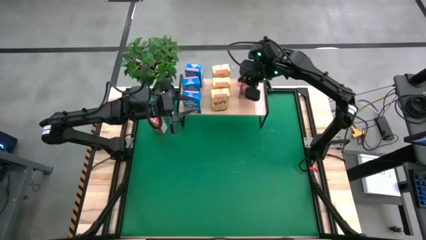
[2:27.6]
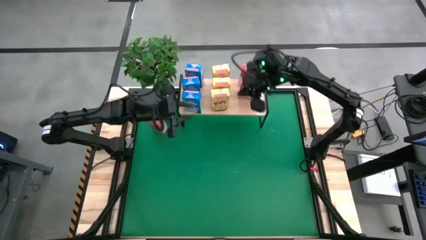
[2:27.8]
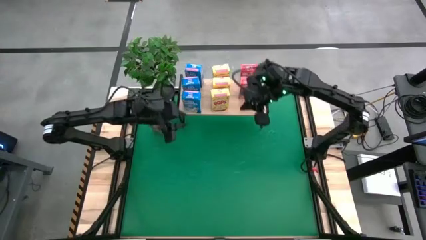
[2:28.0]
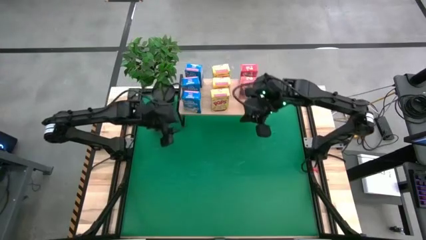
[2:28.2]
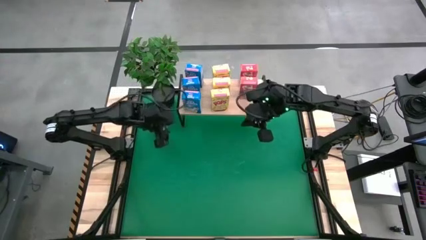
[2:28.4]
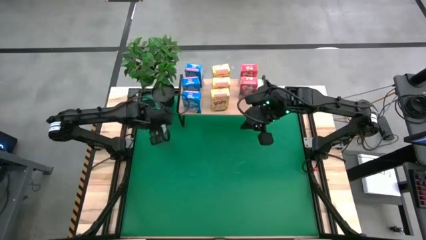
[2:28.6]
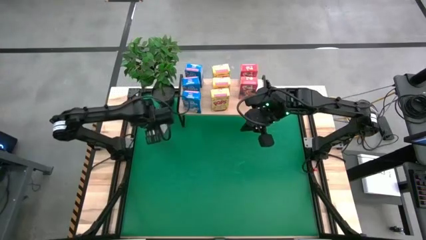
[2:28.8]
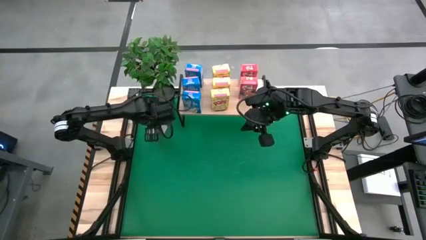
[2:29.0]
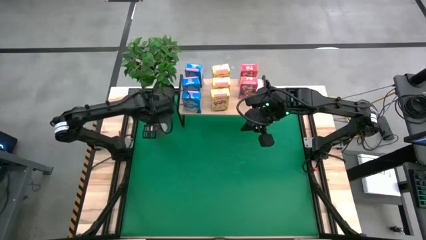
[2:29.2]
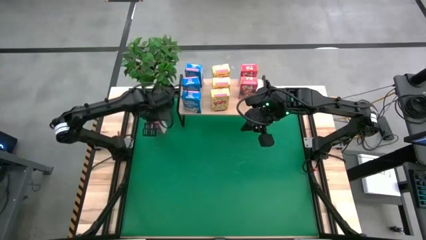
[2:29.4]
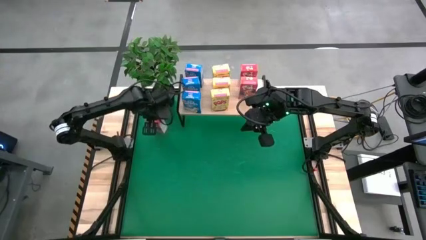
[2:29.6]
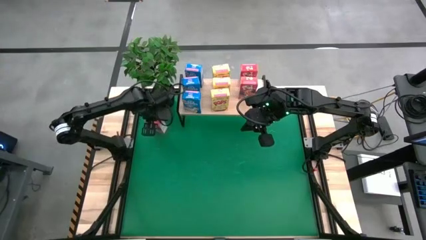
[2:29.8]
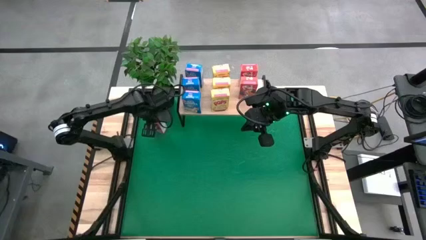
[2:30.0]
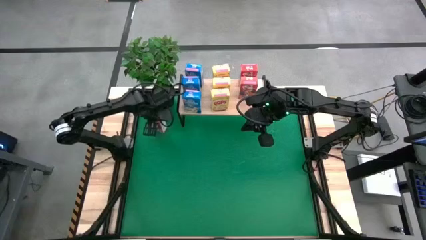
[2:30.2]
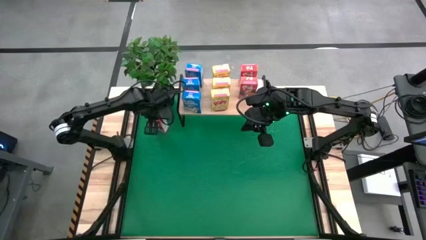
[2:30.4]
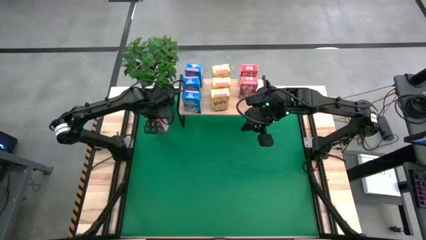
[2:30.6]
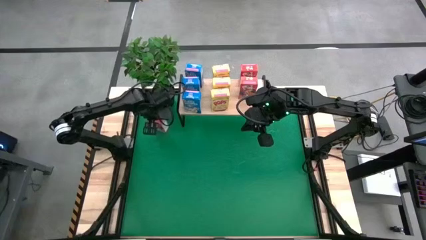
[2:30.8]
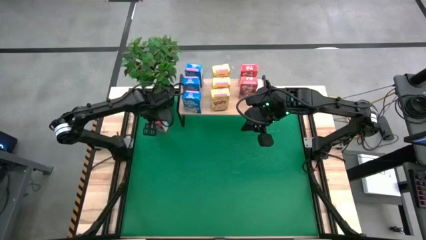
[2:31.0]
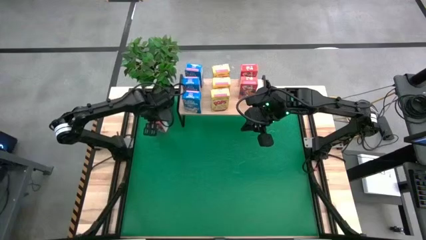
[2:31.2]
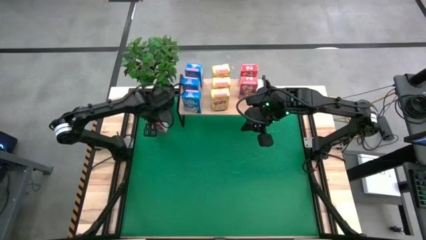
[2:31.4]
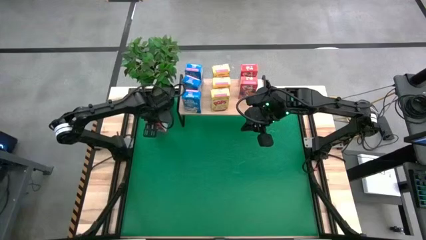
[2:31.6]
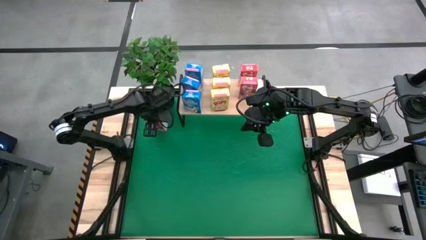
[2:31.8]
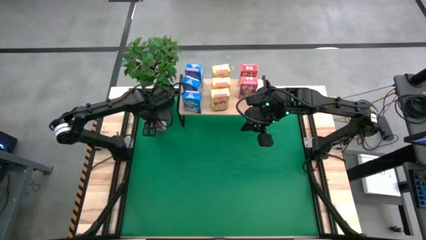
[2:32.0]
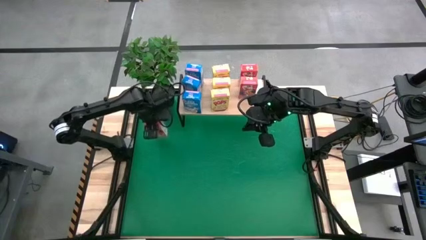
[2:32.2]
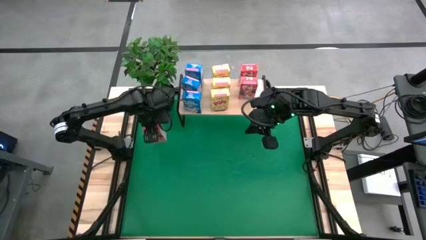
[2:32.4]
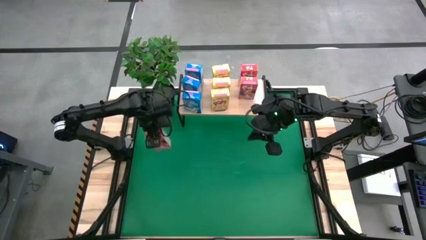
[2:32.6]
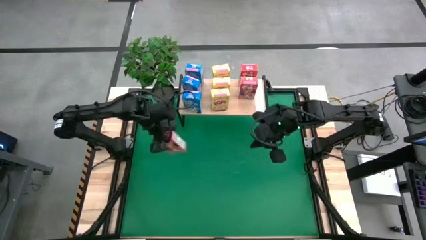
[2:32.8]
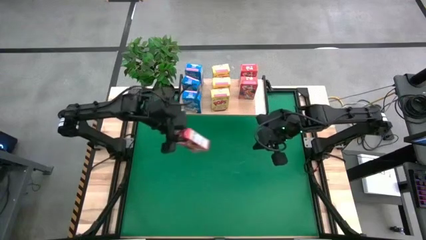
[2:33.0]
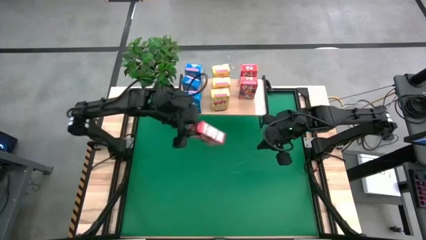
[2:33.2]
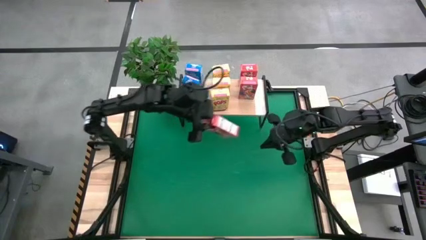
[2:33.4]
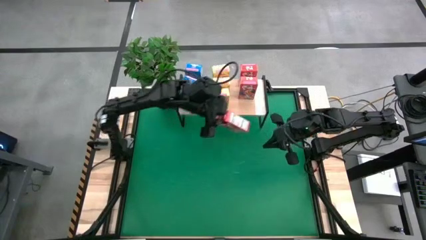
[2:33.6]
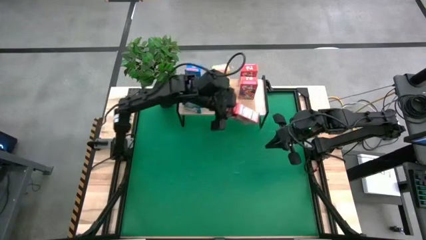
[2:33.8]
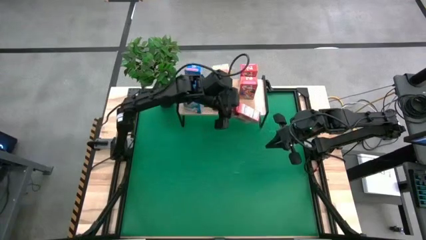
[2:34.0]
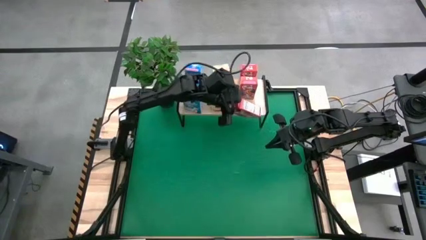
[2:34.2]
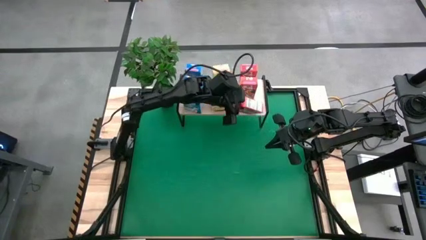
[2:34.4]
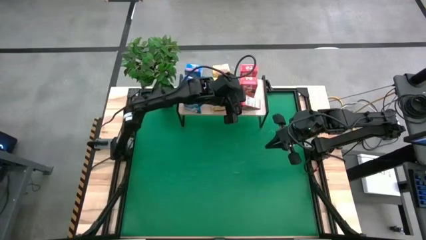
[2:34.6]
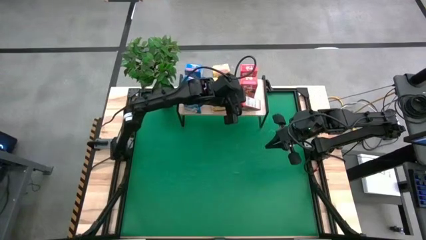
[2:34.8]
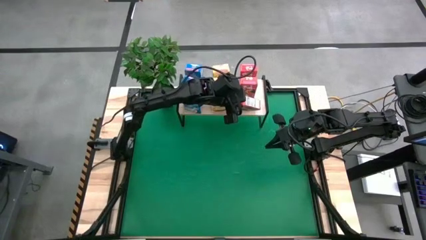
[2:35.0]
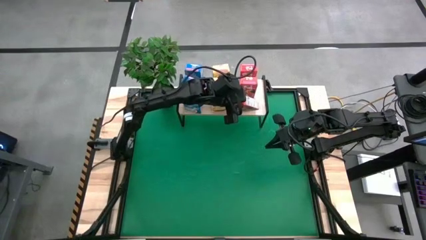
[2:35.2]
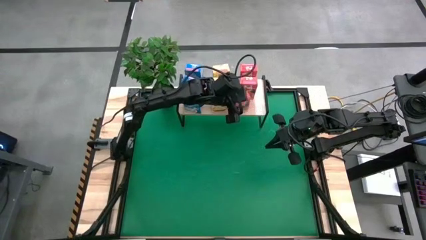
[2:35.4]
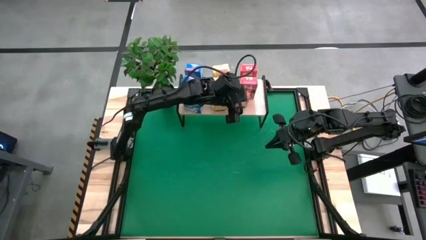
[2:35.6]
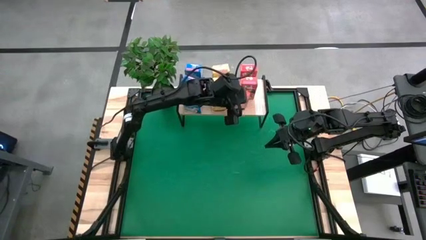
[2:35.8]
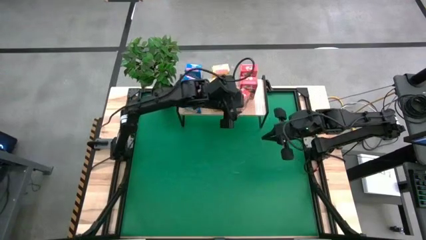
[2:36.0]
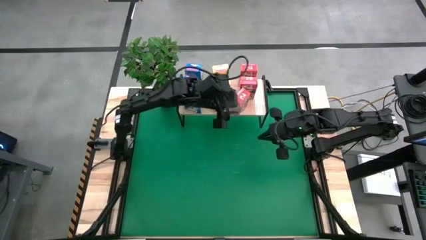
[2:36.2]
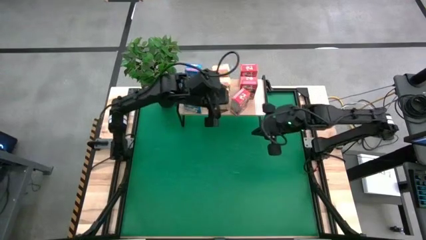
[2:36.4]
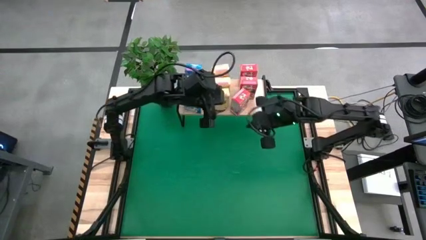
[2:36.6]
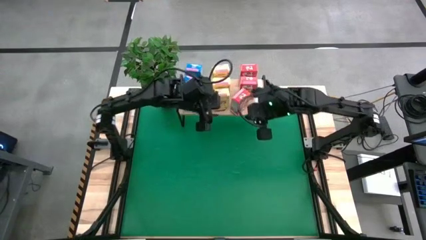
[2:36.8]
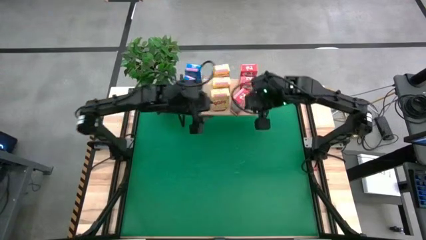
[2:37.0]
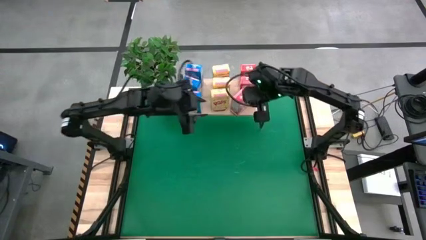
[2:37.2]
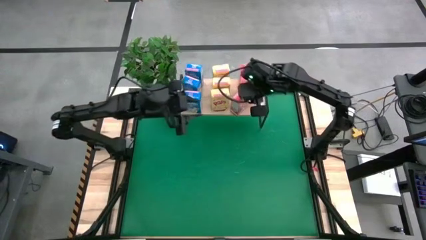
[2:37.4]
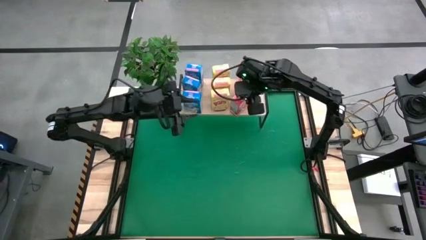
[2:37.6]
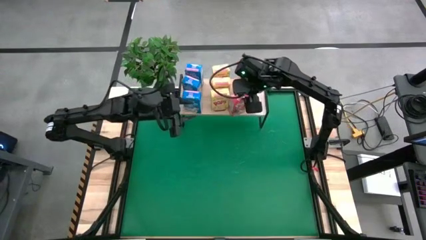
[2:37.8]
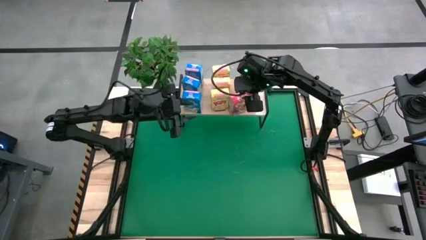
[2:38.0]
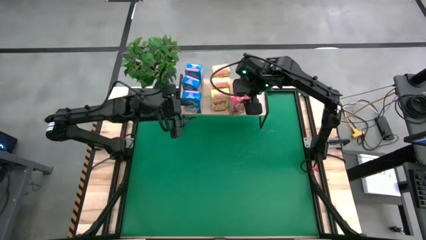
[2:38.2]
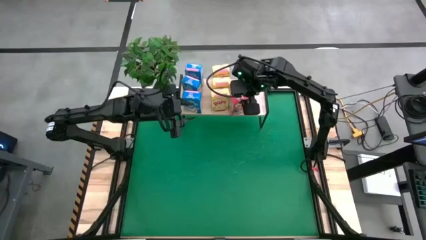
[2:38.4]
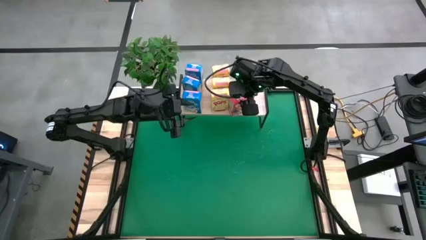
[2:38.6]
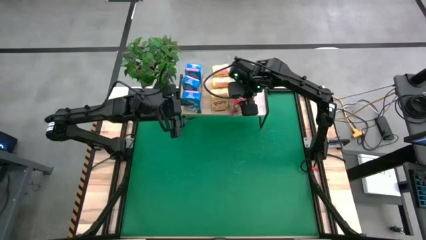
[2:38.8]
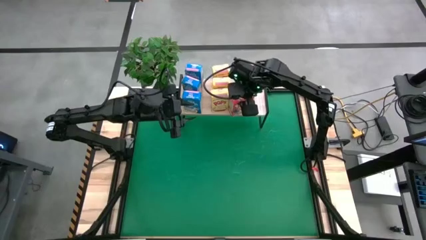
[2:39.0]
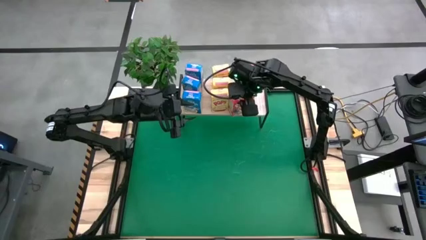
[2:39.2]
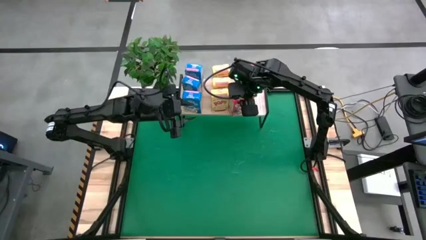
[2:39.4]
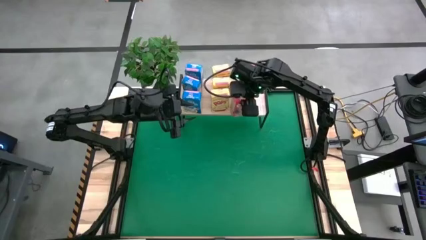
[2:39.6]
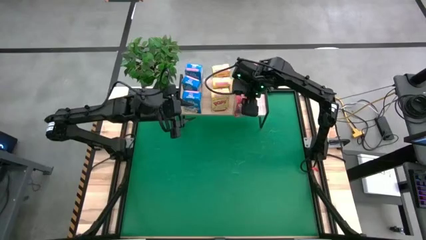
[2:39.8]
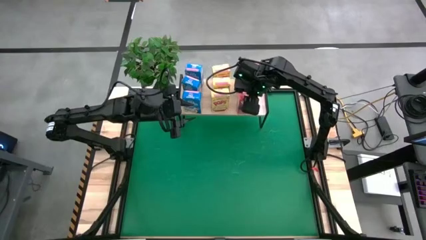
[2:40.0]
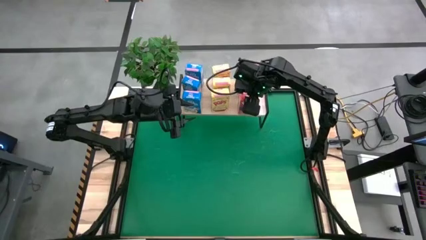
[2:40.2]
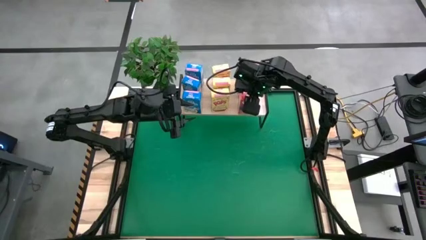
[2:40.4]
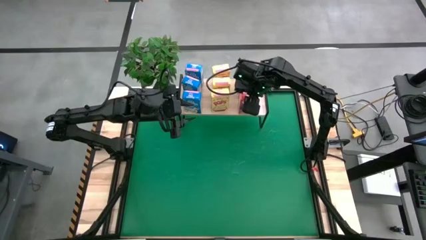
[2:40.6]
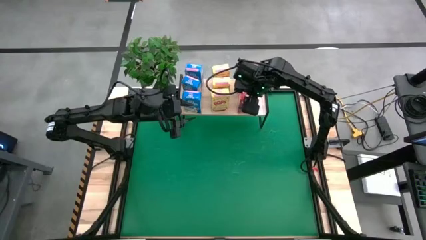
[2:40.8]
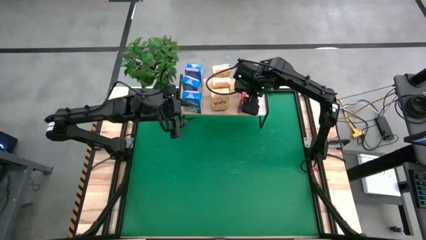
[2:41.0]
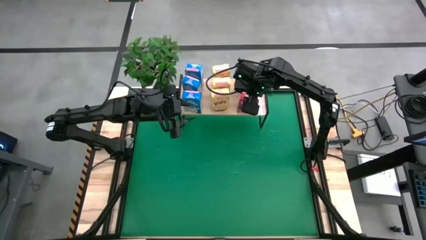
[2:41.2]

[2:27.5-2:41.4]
Task: Stack cereal on shelf
Put the red cereal box on the shelf

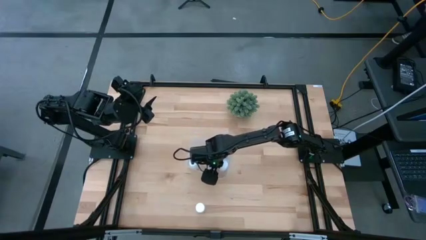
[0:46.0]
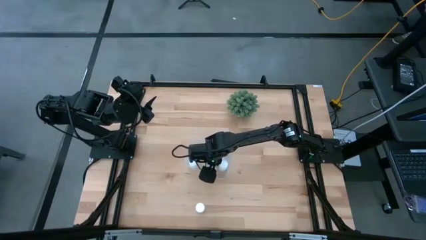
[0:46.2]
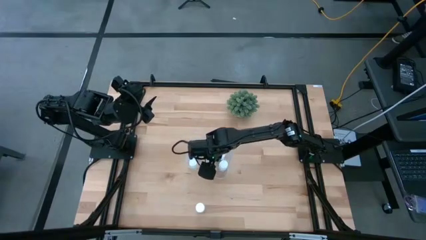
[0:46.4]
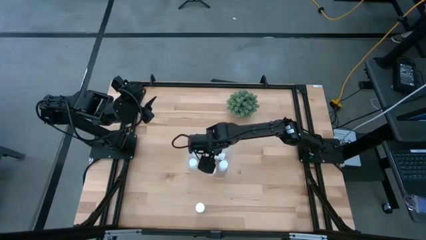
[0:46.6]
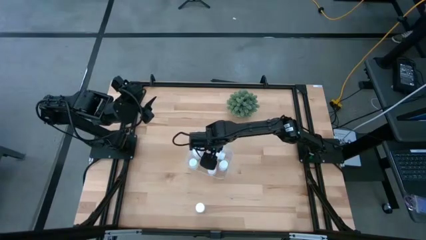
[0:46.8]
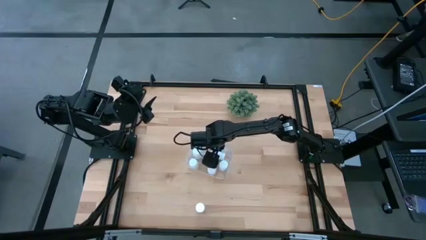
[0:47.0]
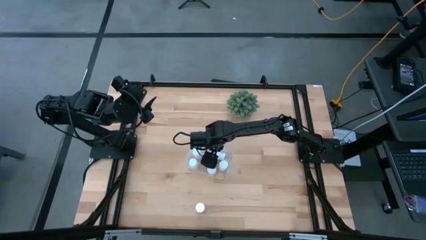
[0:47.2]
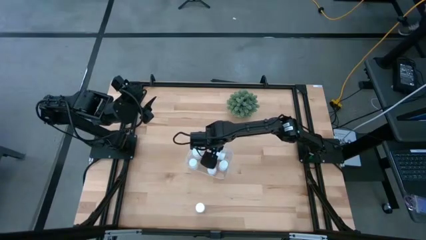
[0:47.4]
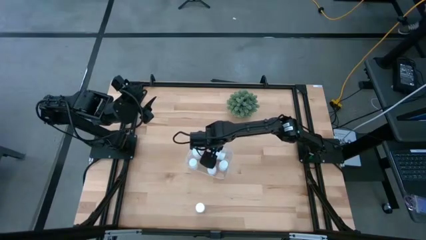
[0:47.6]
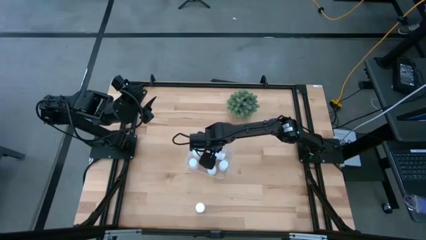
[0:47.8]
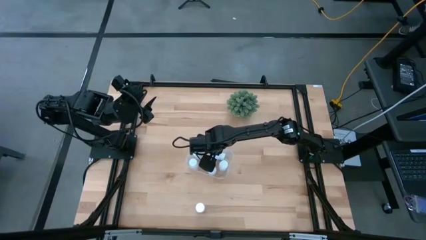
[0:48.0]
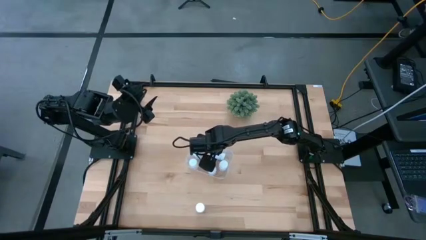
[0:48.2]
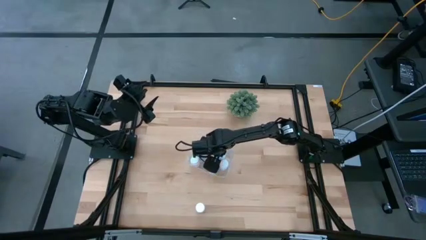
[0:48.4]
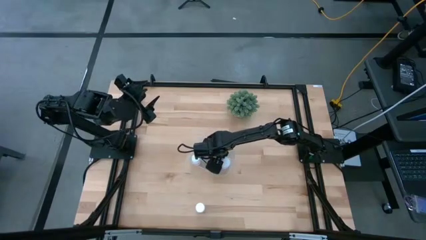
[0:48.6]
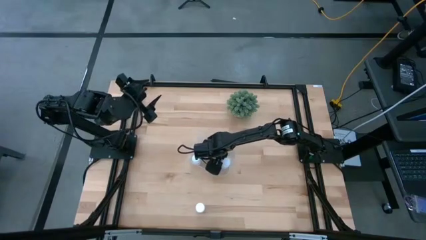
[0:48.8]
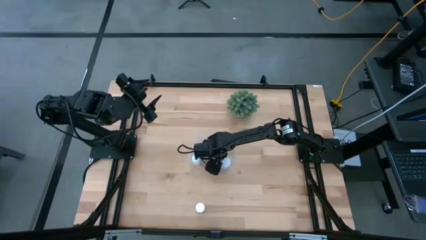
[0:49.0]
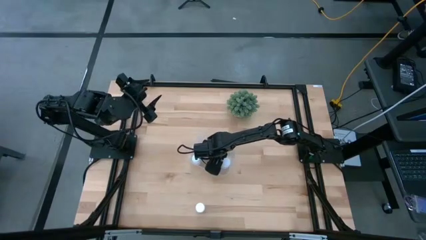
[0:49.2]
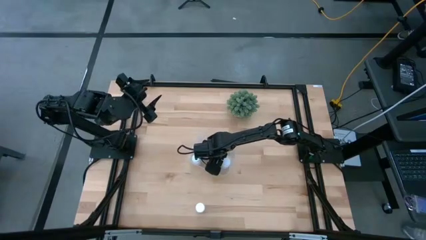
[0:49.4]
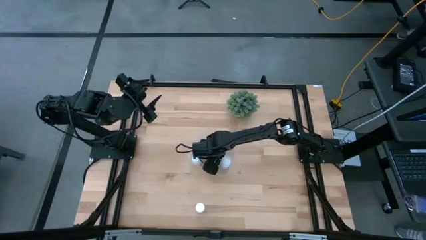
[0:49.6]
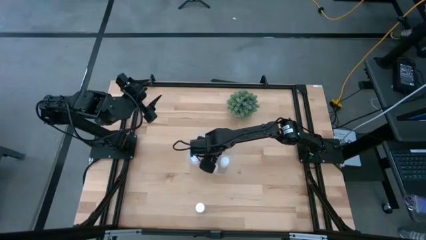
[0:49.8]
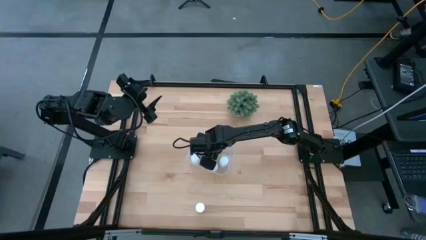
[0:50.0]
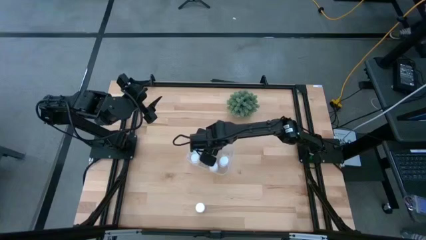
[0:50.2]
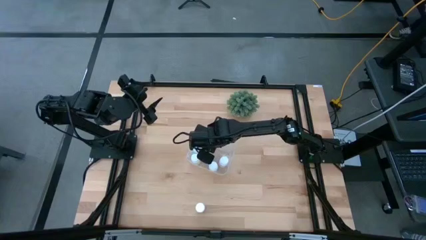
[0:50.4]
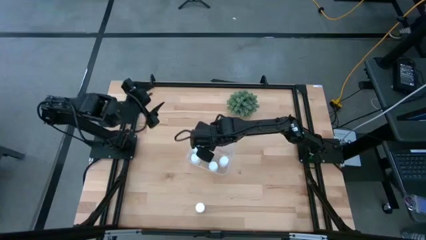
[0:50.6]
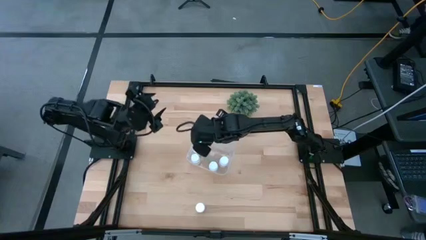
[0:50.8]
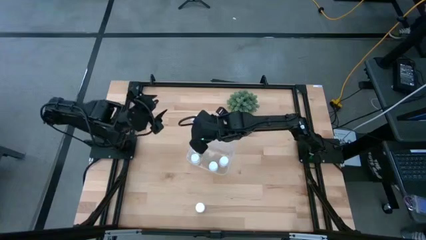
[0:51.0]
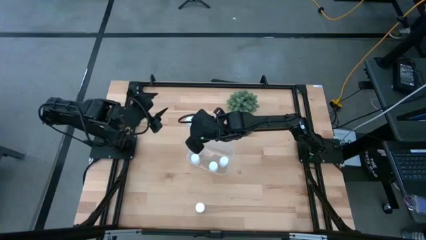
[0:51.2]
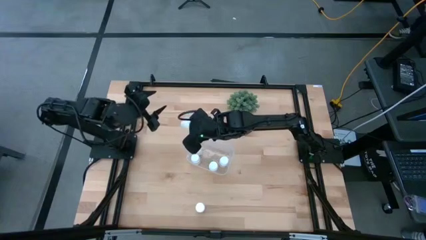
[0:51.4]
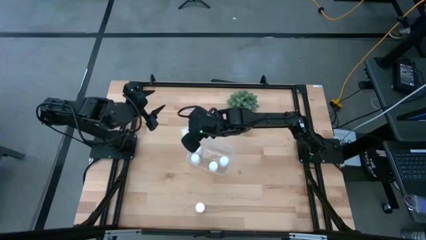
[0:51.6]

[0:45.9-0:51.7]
Task: Pick and place pill bottles into a basket
Adjust the white pill bottle in the transparent bin
